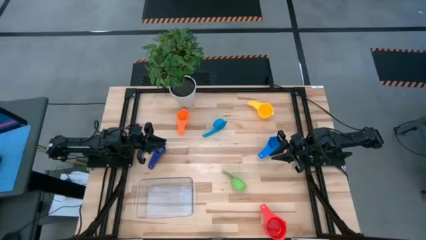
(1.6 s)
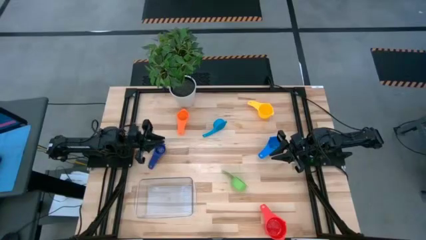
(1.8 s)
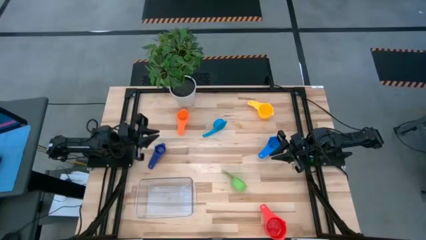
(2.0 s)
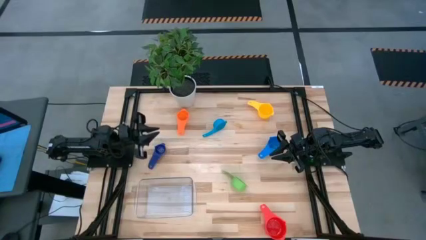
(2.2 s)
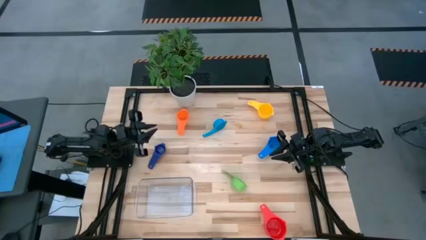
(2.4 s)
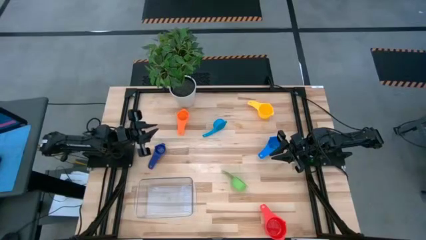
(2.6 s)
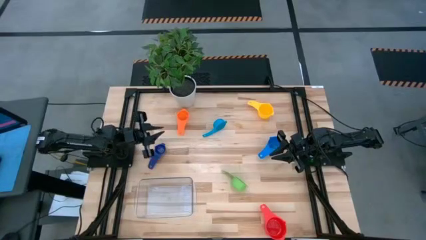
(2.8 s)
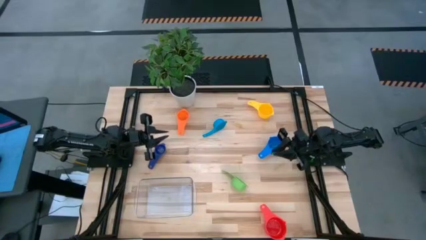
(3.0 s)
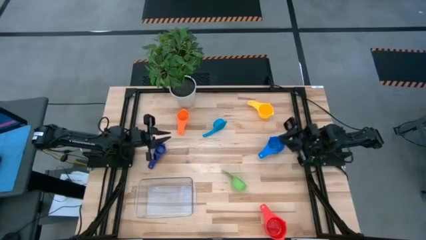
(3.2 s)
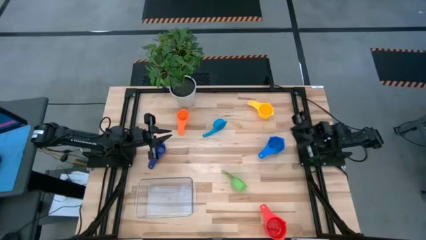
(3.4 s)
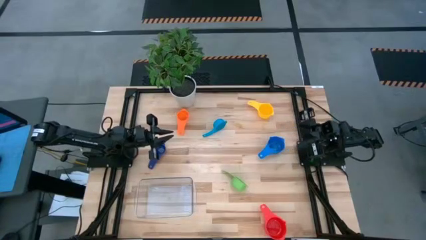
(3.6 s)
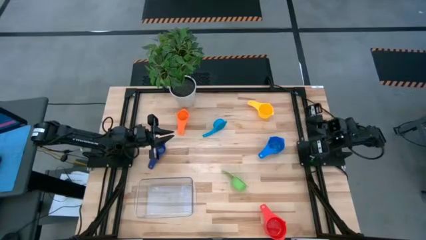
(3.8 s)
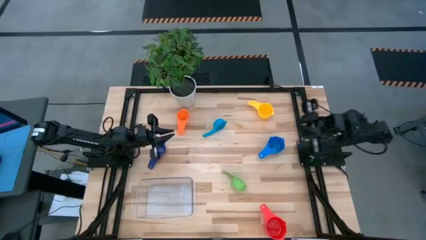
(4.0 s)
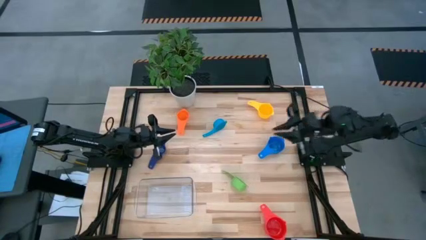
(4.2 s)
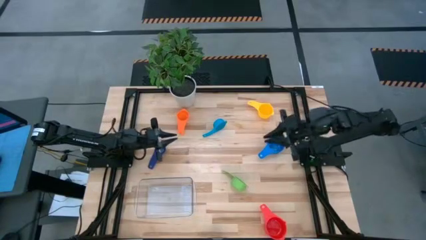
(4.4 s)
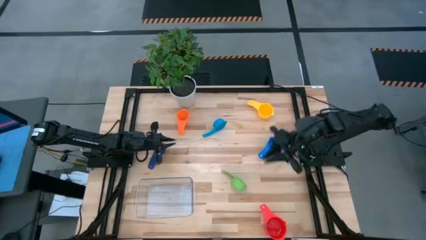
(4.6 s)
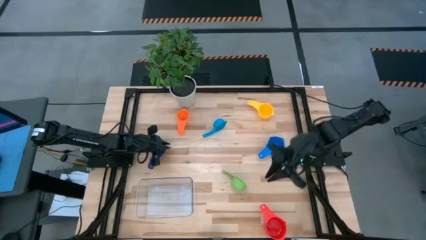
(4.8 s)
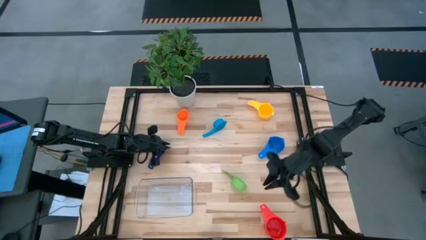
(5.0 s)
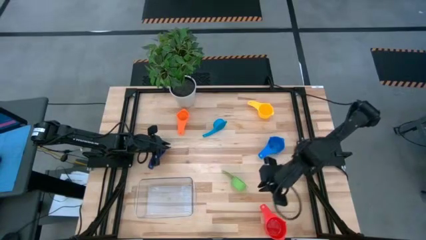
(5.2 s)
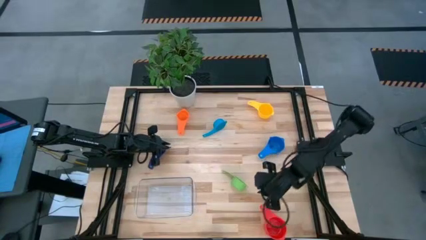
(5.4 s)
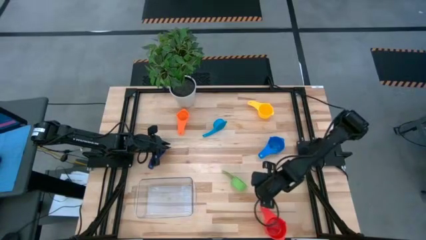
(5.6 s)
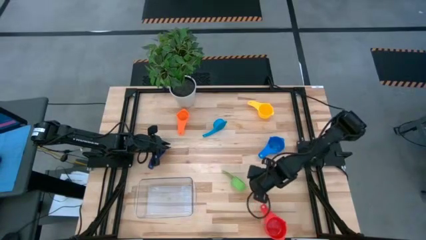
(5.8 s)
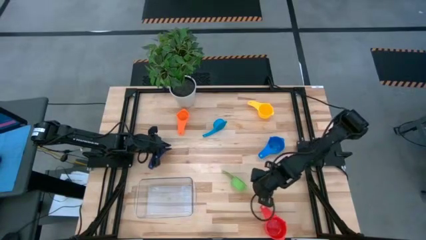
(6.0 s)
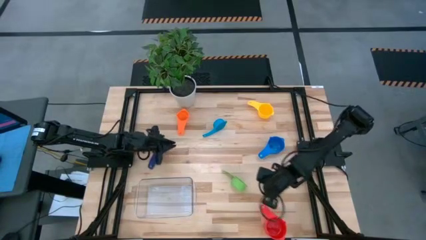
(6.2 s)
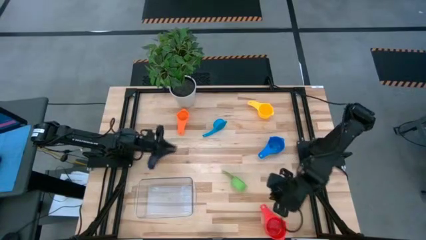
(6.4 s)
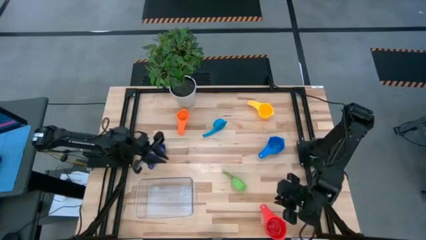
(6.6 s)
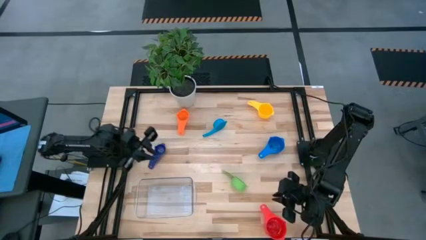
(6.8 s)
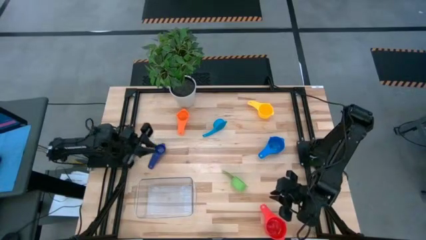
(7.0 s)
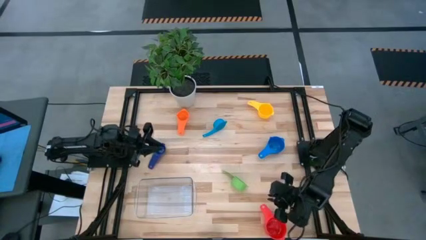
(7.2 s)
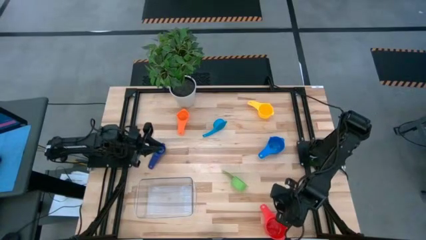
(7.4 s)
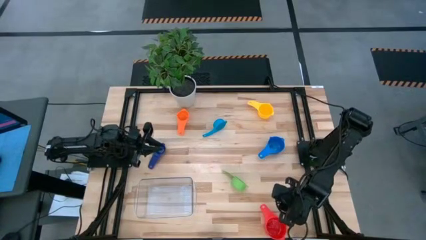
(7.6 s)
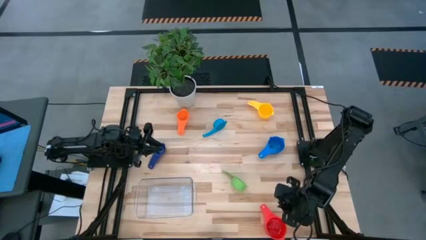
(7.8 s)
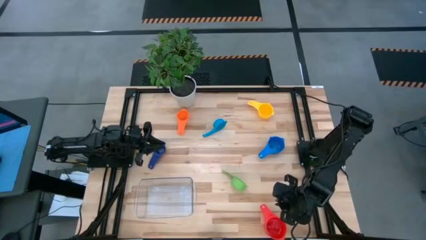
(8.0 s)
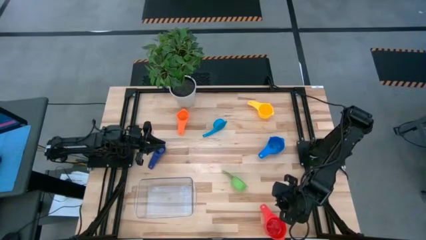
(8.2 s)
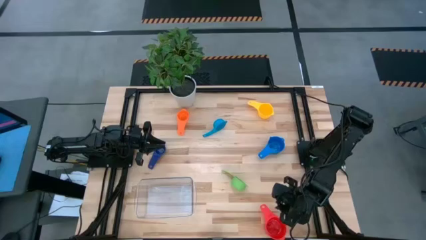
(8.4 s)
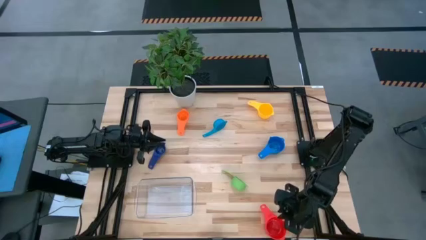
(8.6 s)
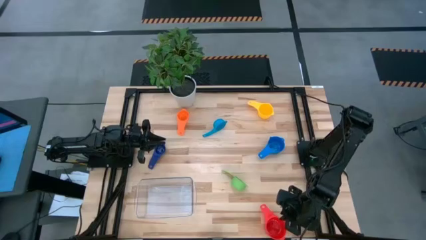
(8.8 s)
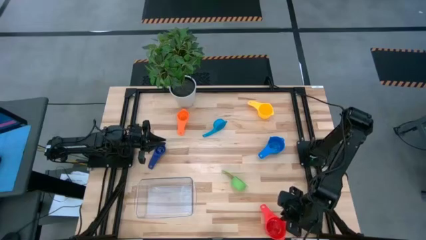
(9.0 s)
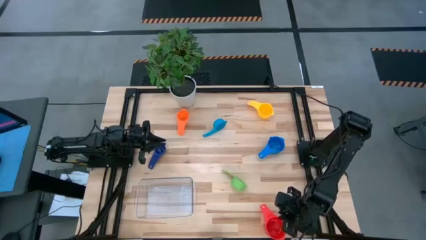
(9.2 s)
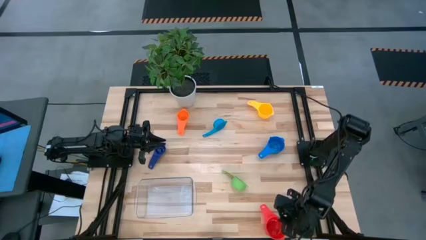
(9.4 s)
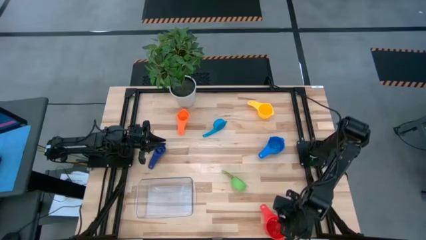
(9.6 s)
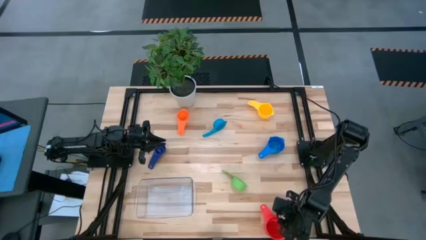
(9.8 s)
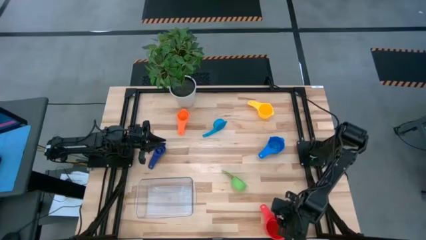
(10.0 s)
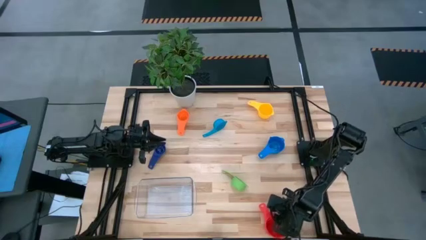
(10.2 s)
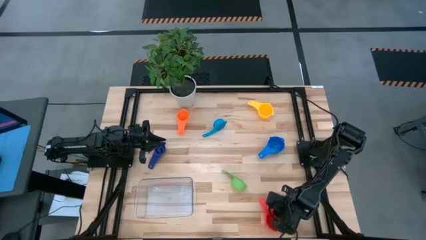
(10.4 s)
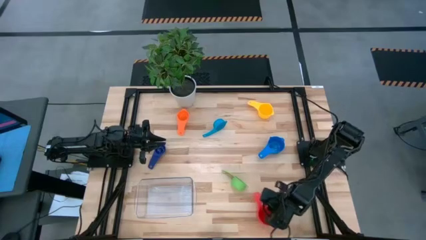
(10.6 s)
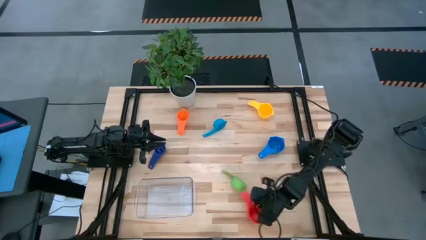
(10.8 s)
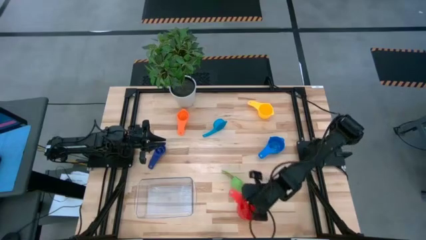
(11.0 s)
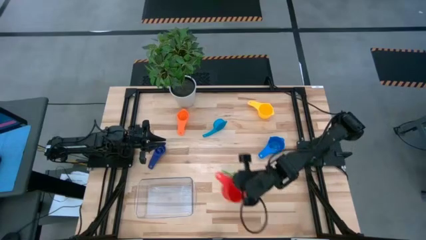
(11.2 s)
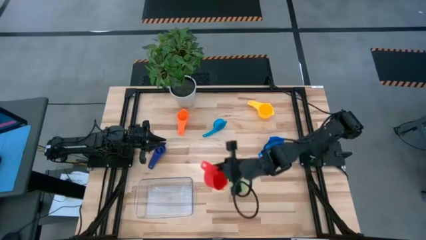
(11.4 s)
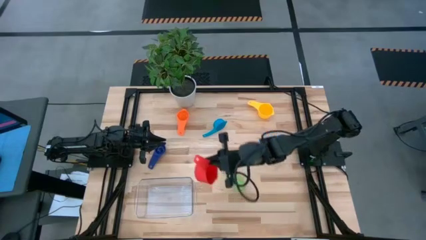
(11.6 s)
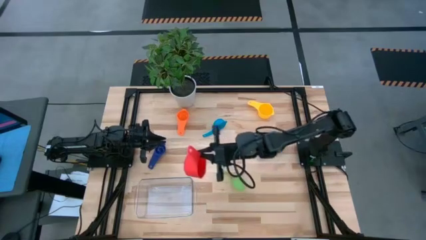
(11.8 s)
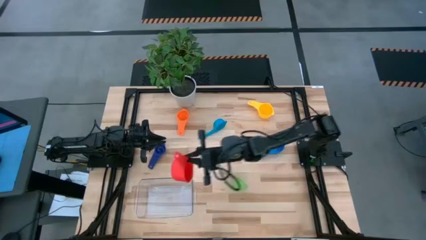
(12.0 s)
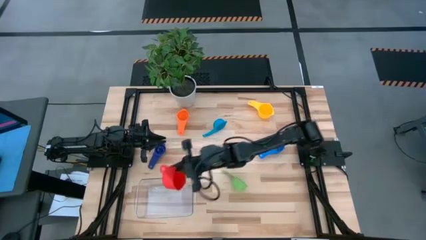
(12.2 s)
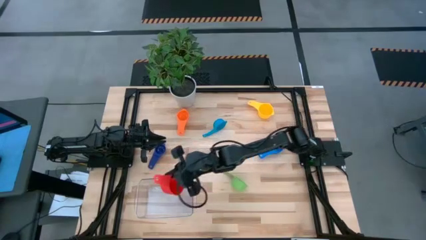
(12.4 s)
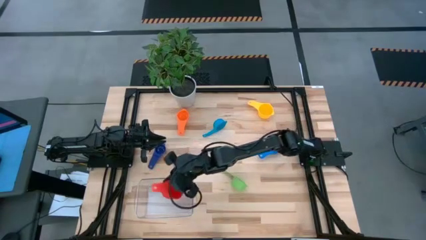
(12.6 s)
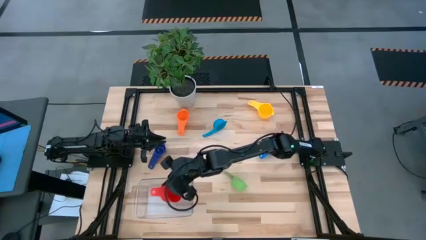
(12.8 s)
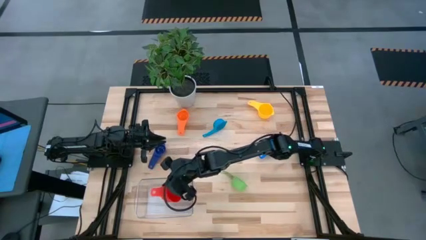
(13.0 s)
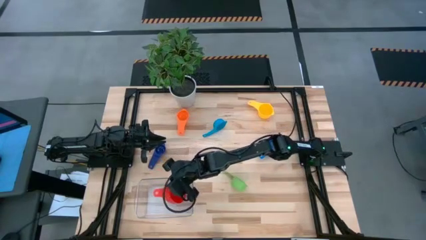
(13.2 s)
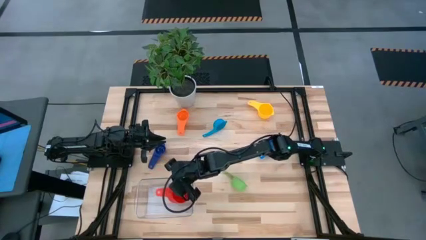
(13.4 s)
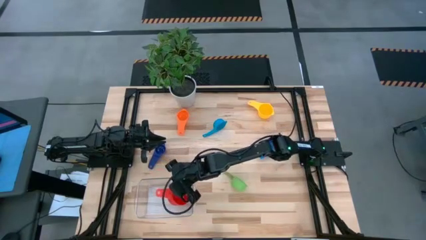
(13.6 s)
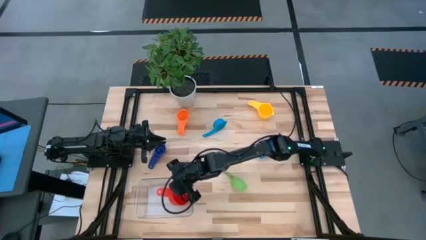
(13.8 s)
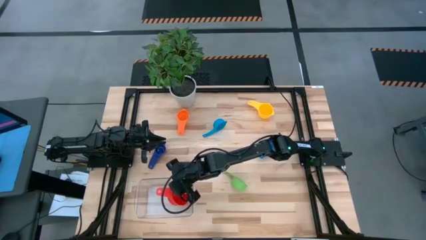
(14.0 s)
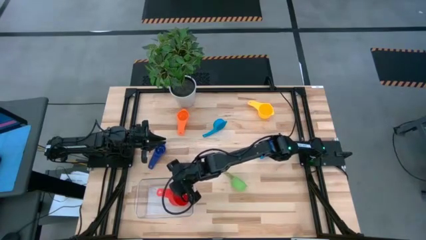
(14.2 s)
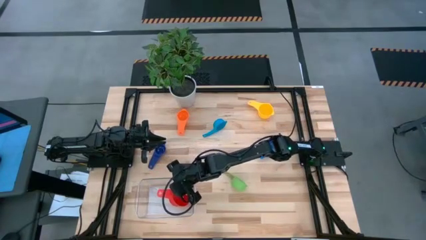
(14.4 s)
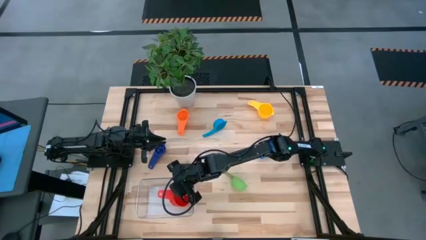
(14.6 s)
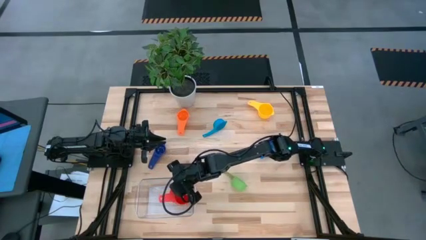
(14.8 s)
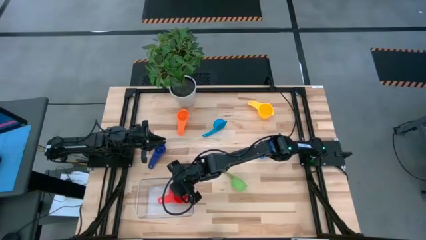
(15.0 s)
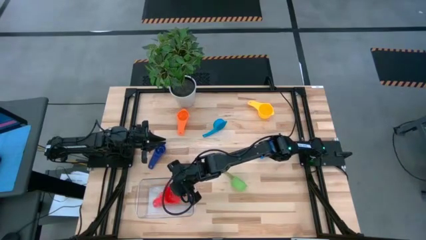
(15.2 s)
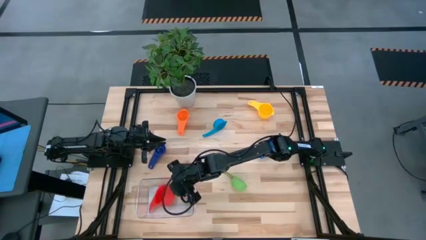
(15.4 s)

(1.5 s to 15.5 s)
Task: Nest measuring cups in basket
Put the red measuring cup into the transparent bin
